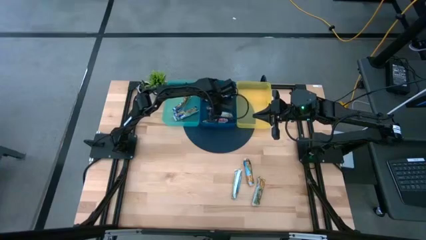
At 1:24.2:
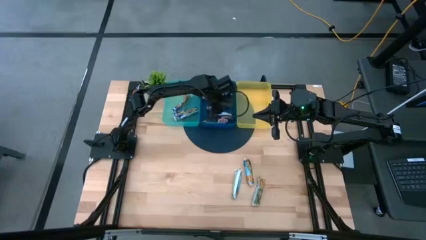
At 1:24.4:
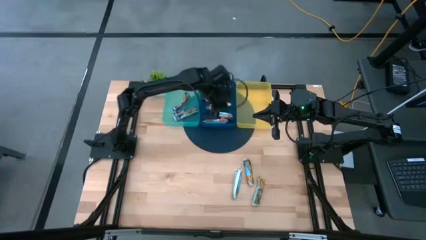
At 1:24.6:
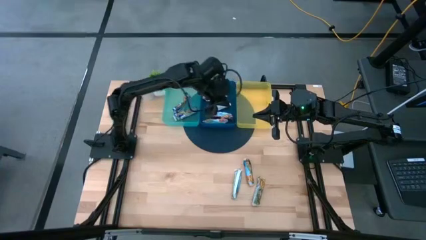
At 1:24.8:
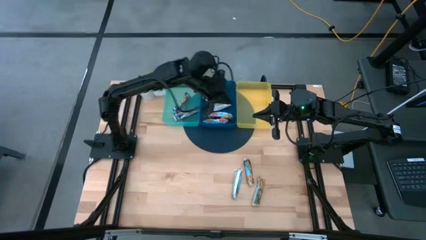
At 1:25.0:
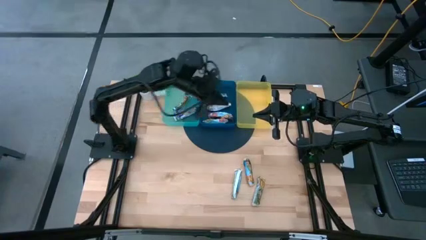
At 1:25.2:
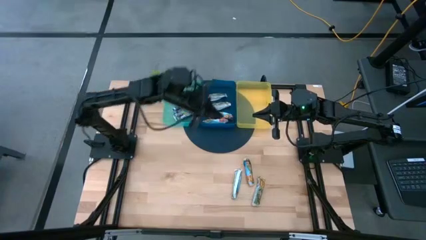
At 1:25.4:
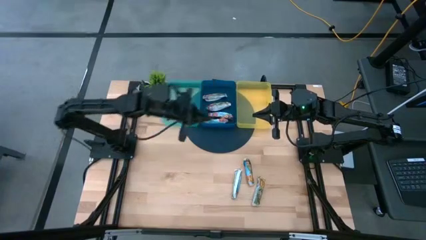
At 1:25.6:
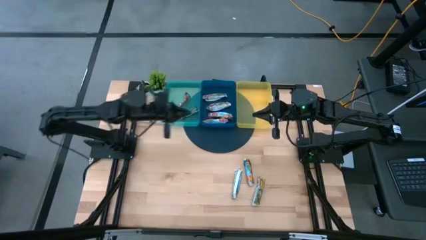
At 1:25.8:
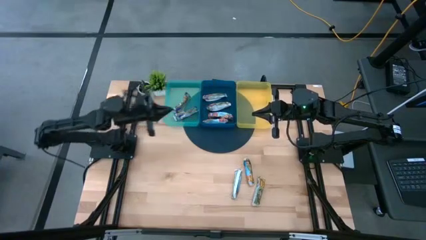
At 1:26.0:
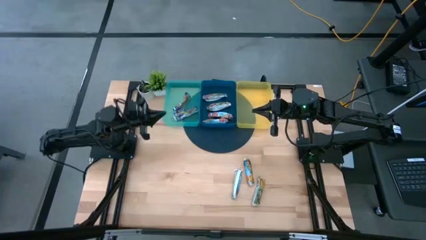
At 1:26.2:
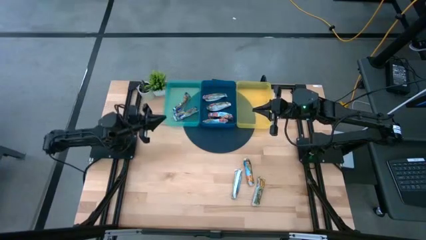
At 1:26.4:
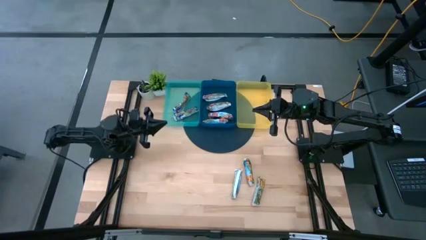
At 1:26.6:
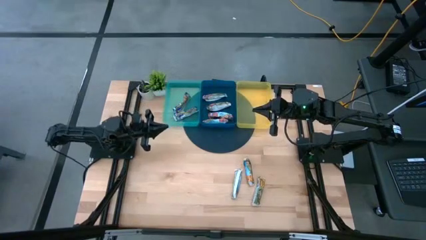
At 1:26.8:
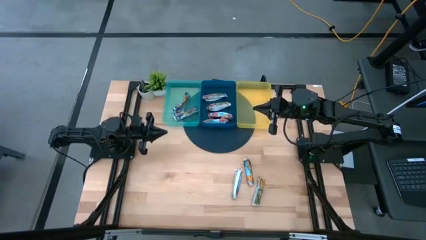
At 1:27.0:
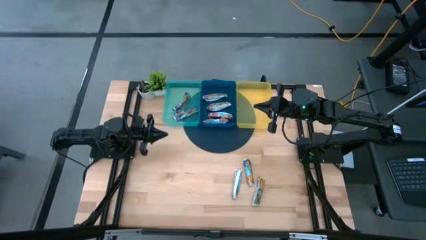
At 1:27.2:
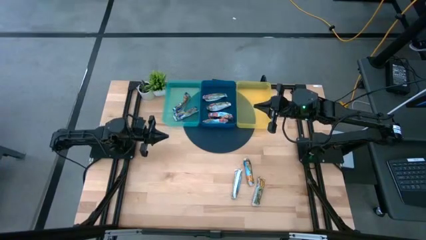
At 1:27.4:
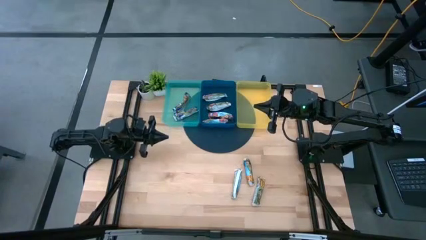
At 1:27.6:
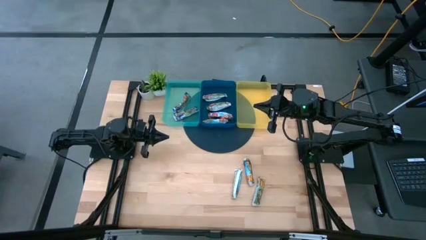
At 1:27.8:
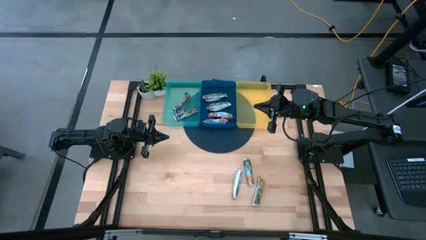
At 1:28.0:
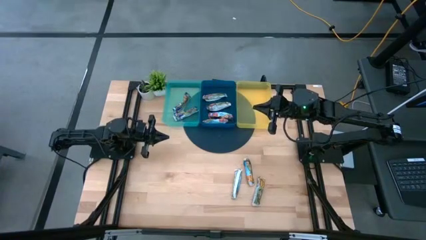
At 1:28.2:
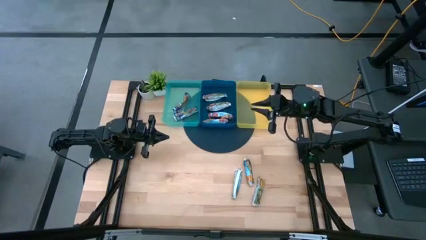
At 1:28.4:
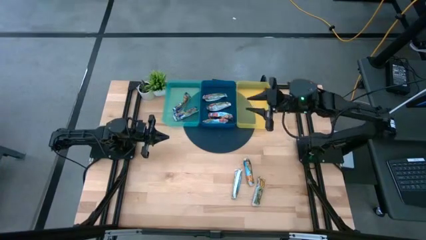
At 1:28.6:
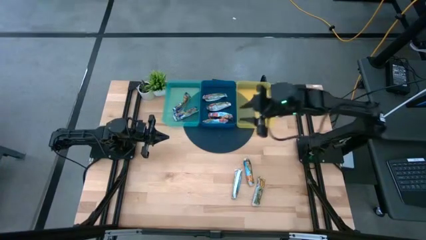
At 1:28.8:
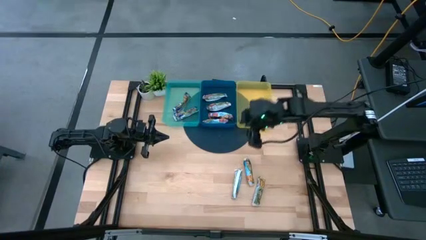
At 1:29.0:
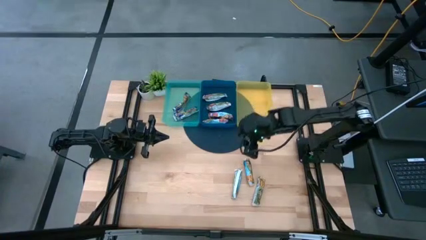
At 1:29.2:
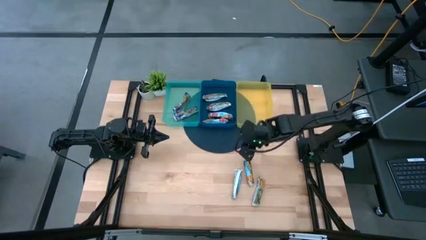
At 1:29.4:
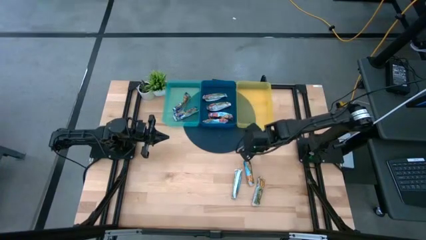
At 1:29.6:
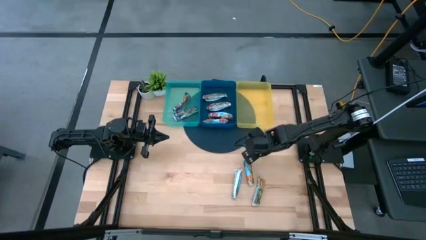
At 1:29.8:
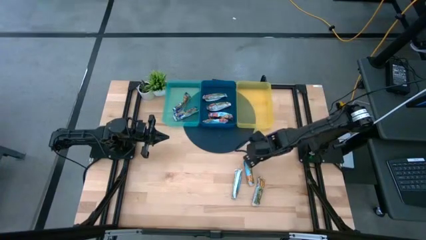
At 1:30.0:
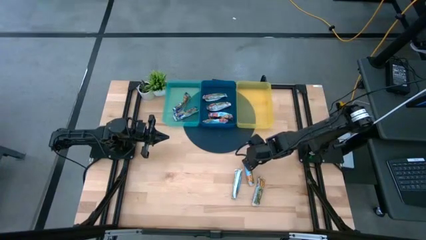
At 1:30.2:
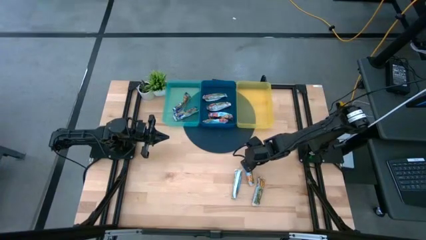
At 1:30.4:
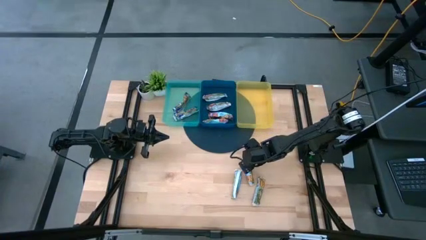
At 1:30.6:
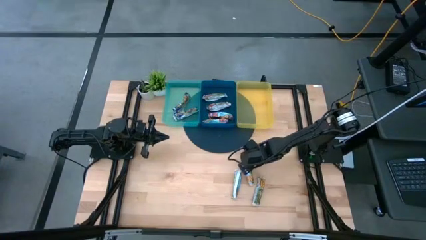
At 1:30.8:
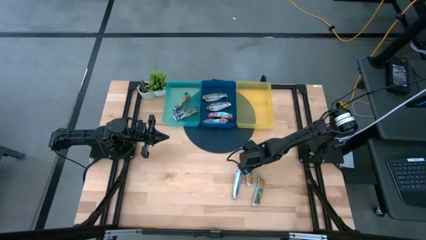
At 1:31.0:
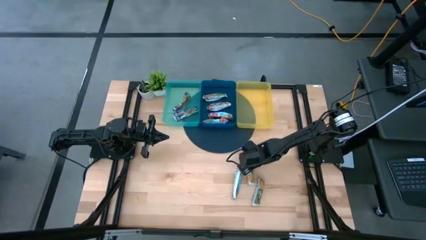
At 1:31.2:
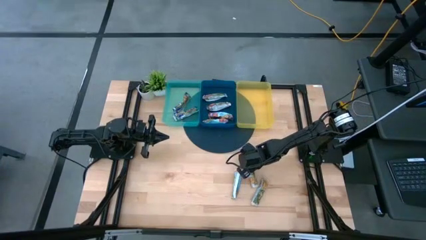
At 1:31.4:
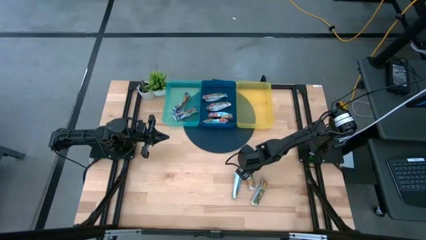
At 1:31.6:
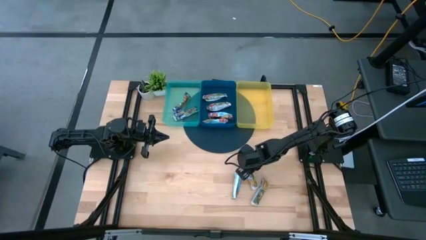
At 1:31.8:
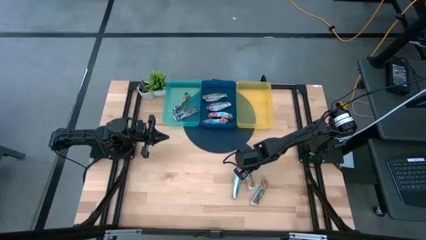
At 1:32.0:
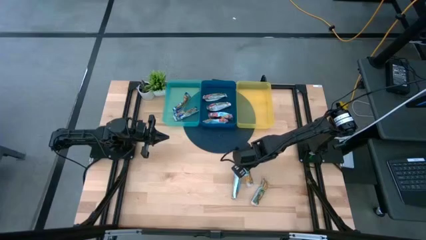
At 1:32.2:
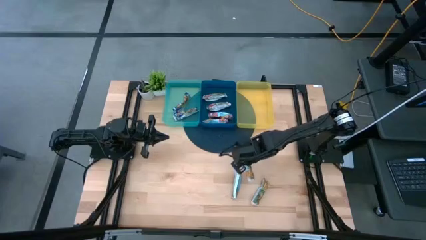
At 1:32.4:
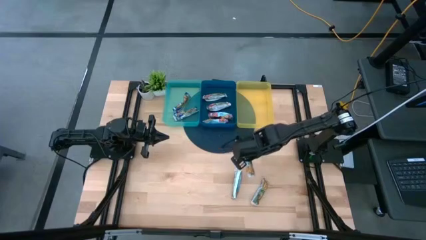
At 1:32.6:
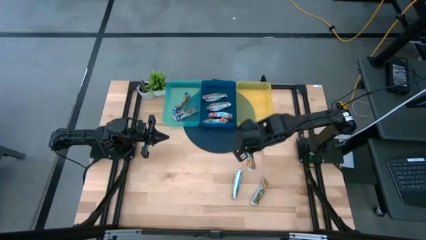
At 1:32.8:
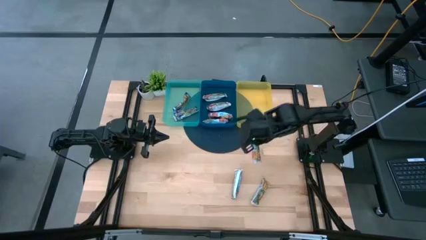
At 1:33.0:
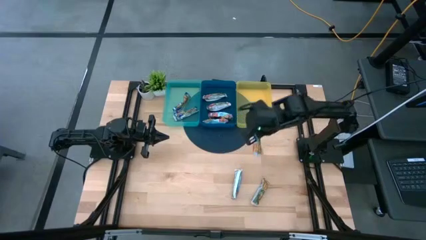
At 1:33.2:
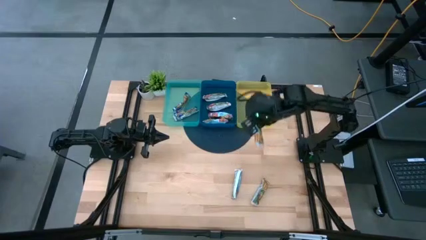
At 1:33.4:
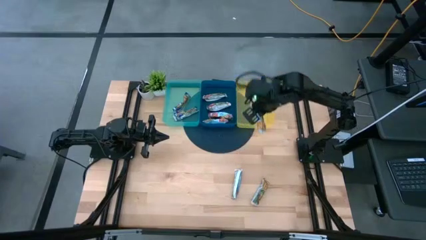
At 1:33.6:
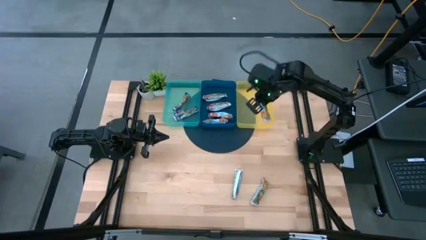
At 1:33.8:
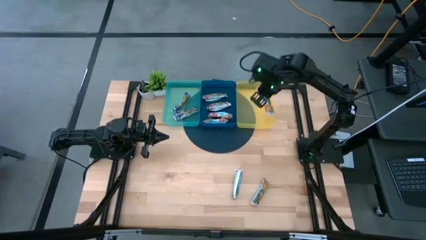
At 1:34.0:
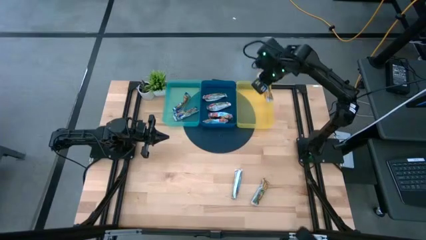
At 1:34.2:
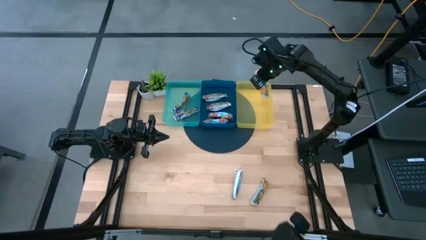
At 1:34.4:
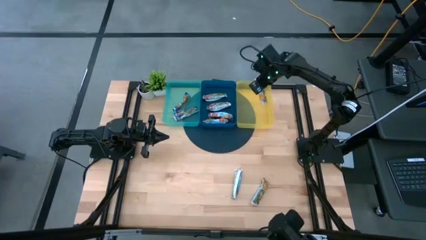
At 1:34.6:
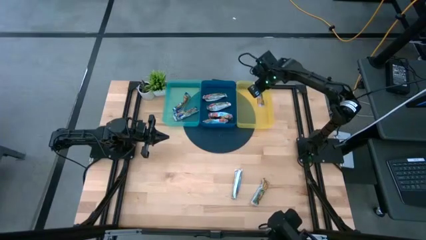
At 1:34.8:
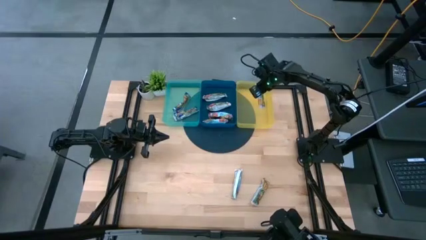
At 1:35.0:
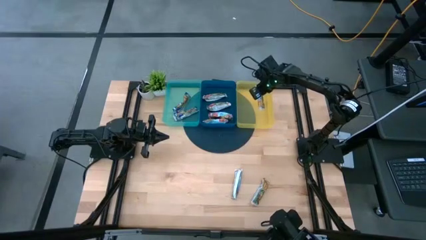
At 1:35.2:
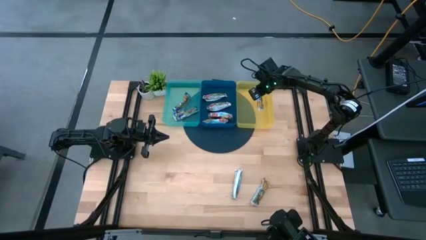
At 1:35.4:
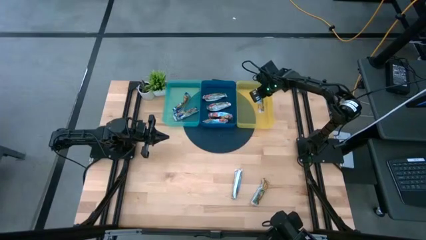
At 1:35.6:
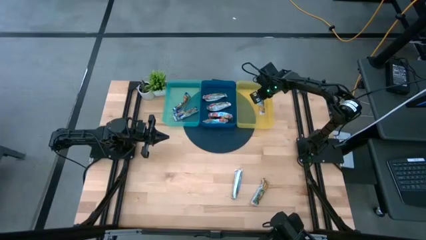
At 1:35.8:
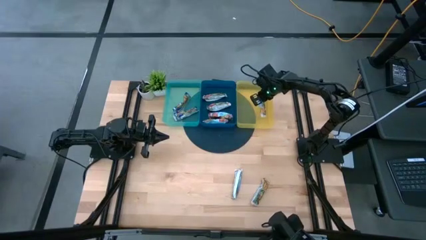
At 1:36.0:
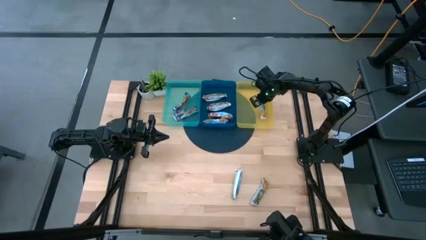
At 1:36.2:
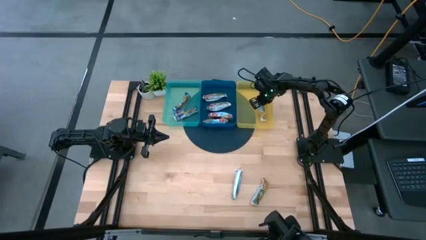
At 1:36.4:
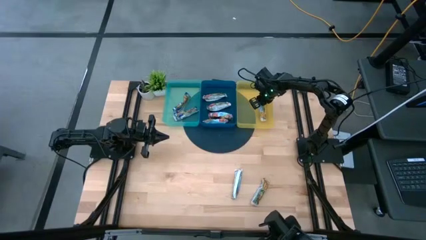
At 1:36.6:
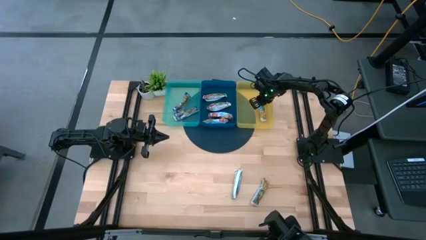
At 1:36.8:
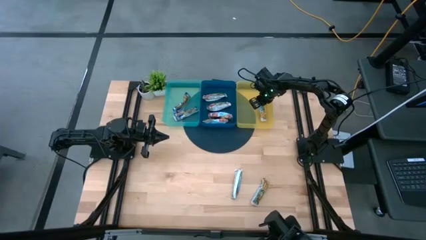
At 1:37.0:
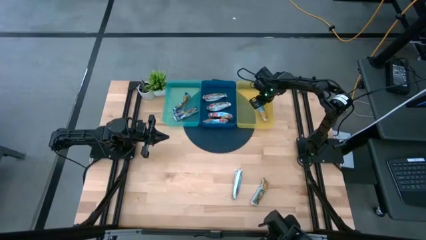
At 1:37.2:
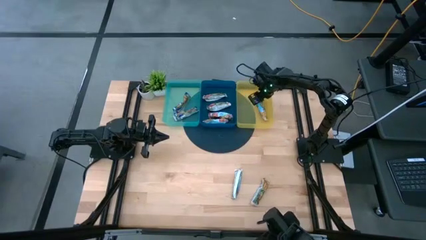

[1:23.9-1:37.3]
Task: Pick and place Granola Bars by type
Put the middle yellow granola bar into the yellow bin
